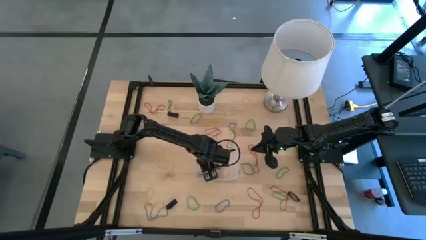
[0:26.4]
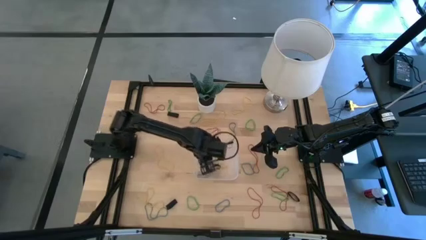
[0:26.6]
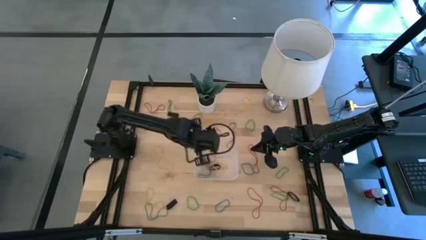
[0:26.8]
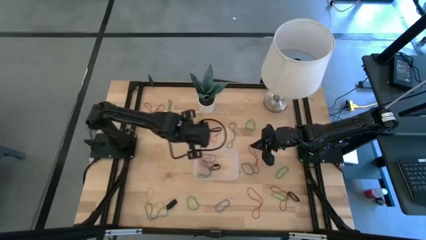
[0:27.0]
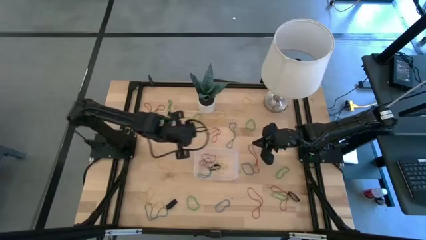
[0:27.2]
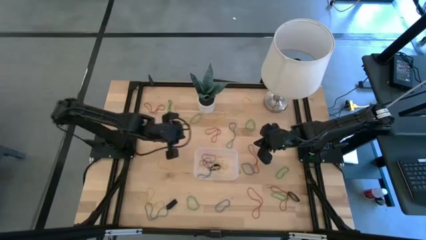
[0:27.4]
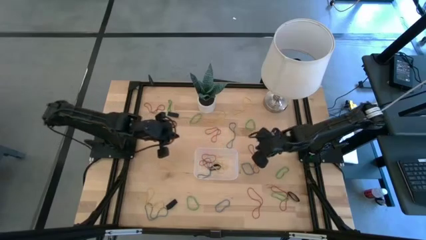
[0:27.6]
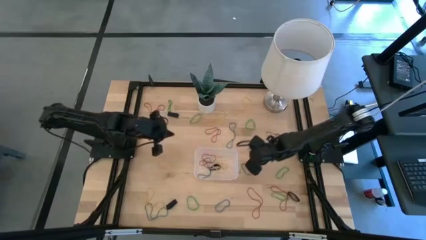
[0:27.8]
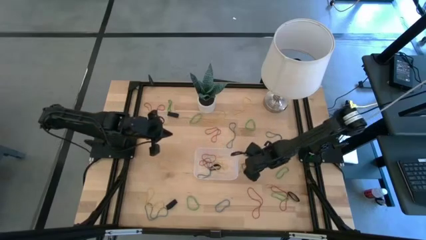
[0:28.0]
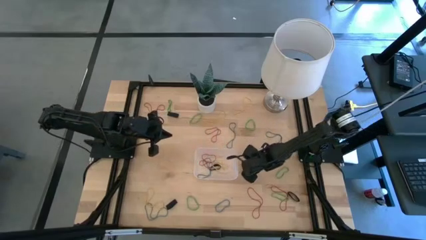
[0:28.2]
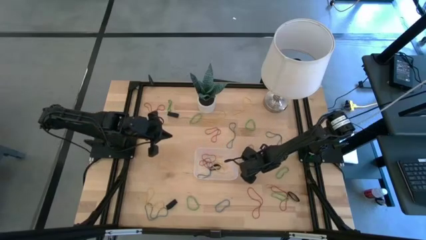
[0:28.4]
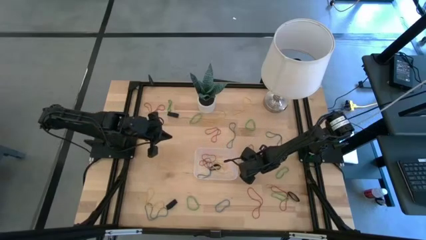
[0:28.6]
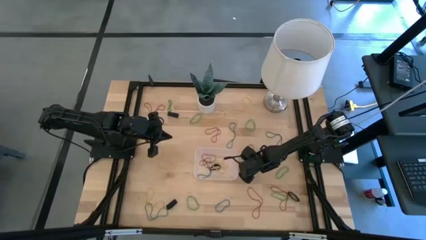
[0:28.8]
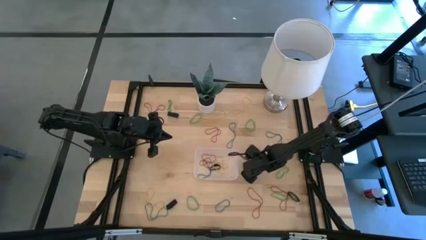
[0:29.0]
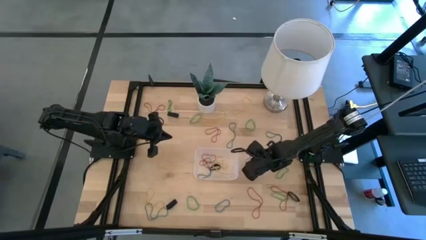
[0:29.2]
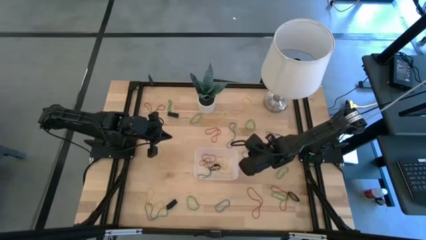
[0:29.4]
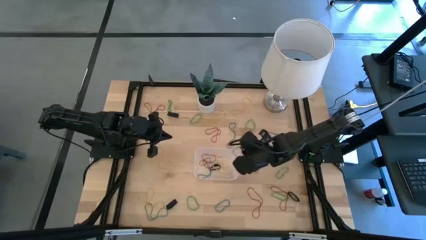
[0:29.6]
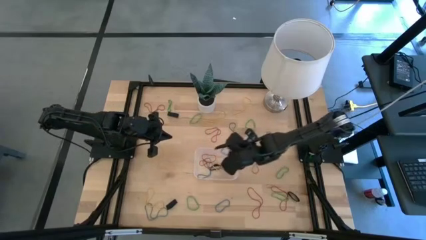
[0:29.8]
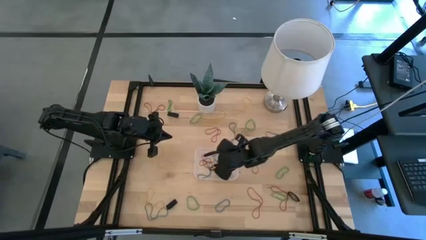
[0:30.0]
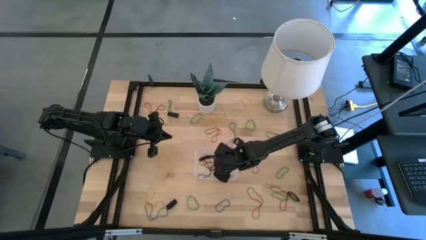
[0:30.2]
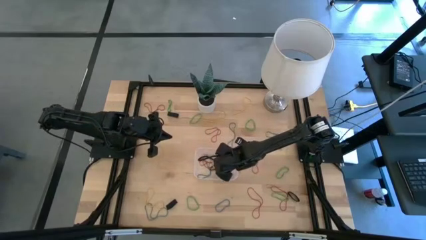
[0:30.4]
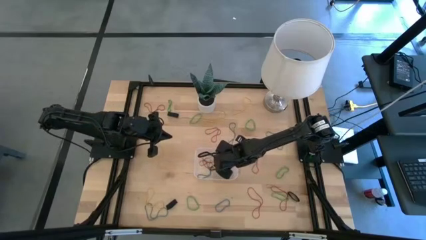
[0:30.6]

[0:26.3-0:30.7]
Task: Pick and place rubber bands into bin
Put the blue rubber band into the transparent bin

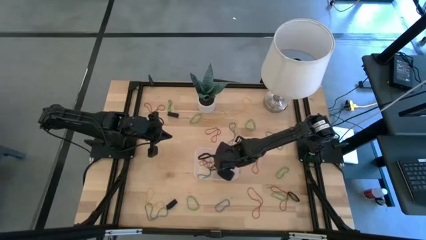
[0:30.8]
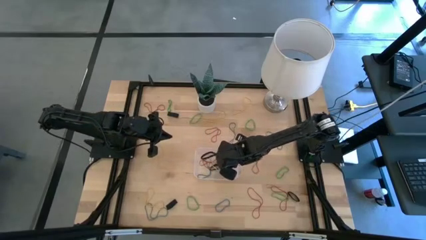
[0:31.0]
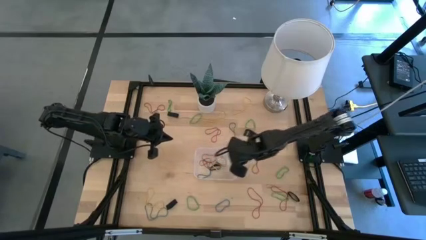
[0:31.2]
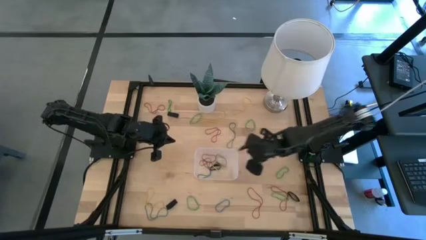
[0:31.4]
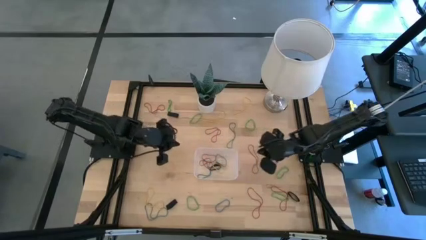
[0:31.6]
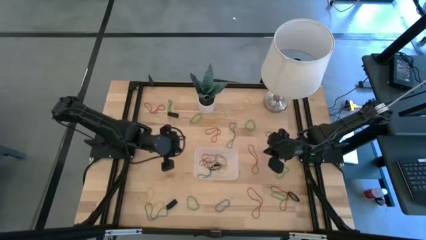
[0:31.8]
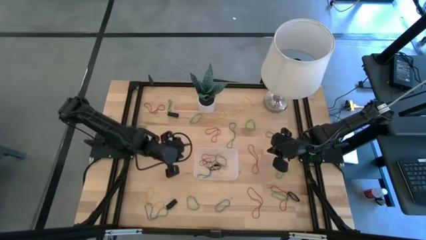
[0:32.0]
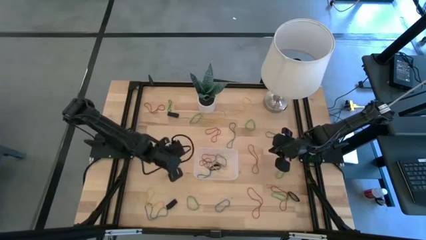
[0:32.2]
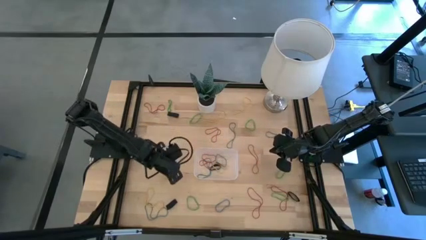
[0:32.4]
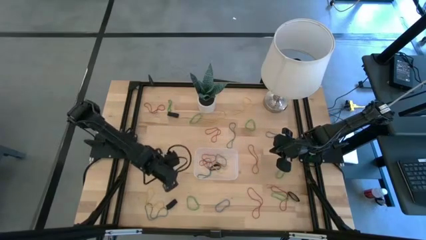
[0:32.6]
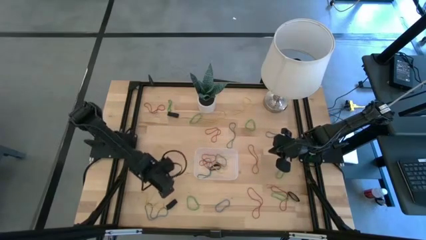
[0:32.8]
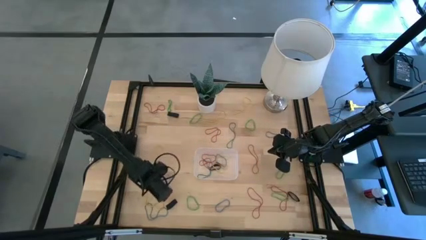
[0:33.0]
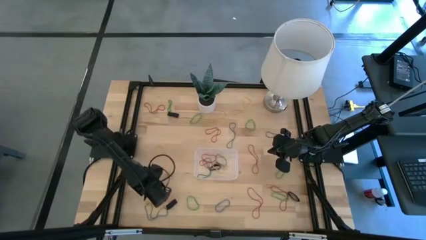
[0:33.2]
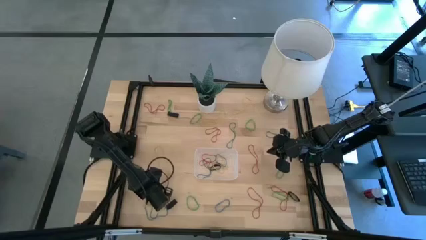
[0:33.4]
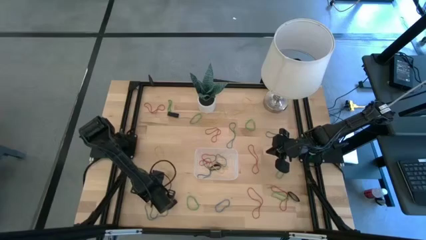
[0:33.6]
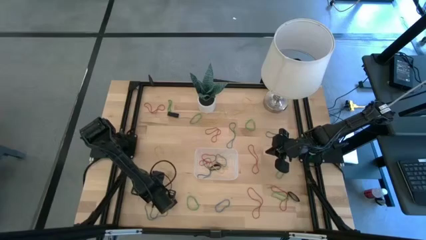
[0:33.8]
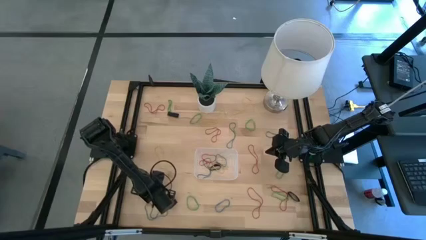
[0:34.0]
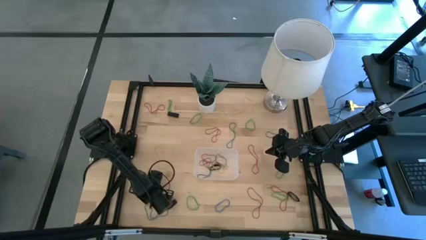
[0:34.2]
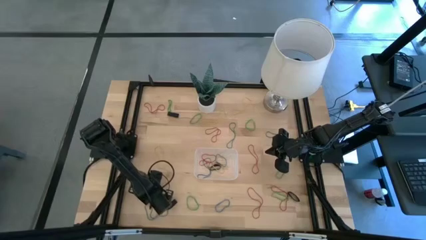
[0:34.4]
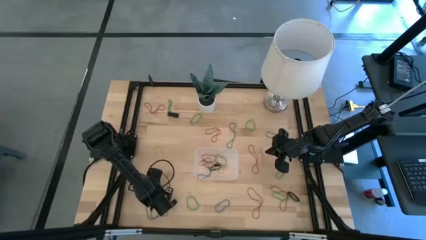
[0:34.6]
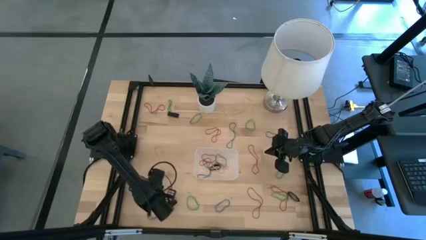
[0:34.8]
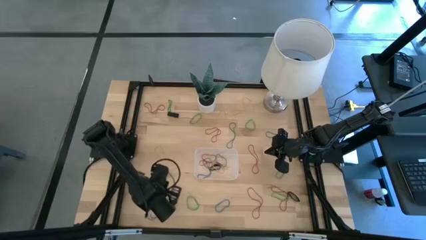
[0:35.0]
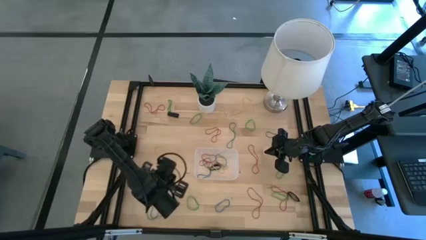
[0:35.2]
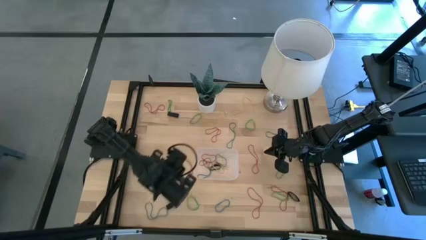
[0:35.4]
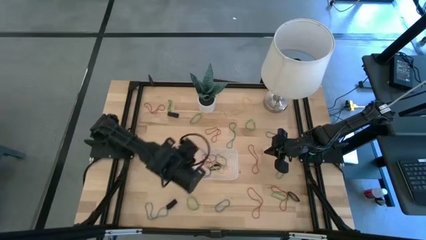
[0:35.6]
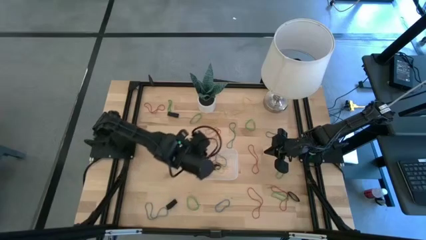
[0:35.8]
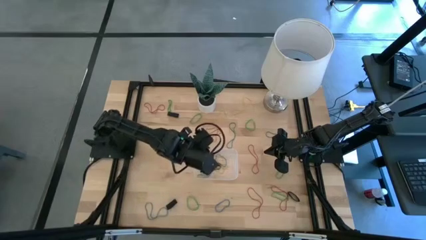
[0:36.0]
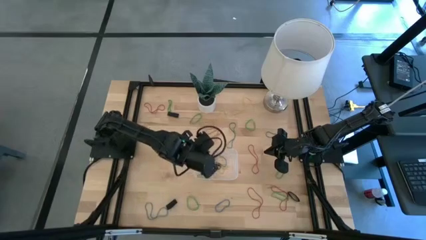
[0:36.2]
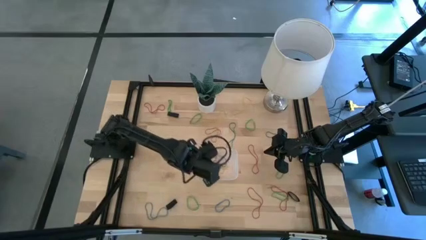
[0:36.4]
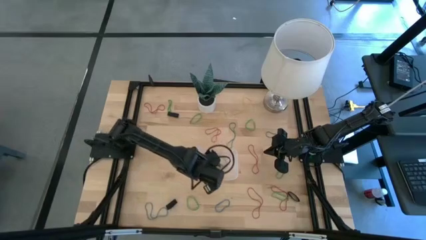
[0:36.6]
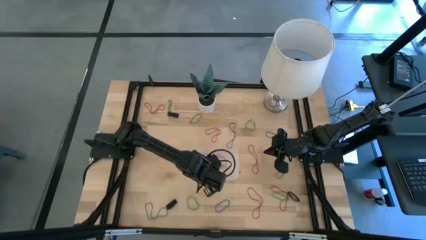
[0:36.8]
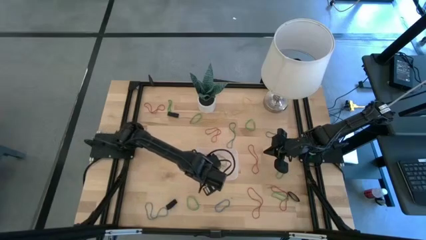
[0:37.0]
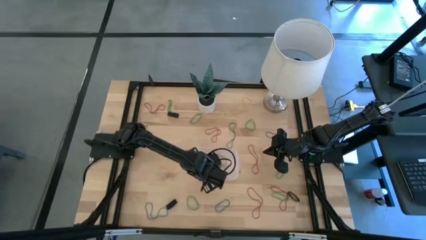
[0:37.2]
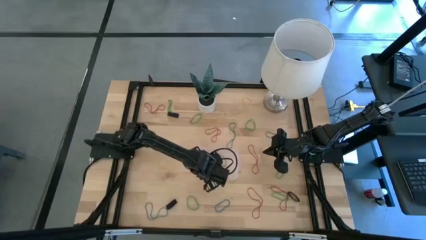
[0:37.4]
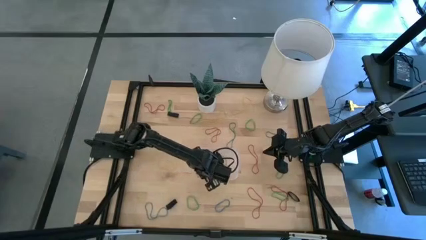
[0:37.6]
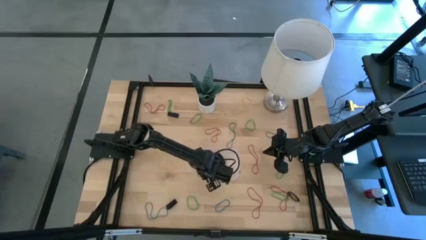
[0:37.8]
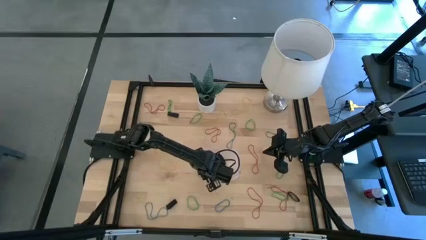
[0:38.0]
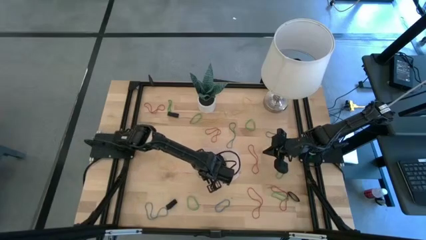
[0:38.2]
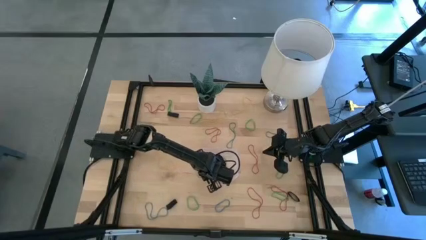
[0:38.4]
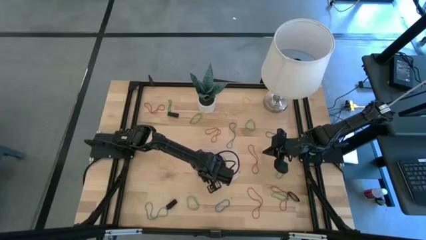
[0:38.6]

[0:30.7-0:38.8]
Put the yellow rubber band into the transparent bin

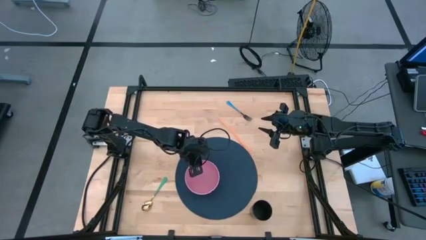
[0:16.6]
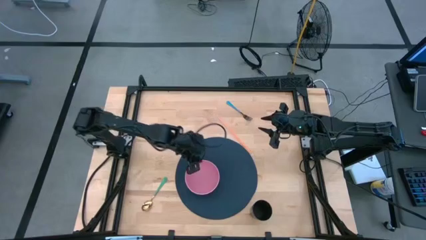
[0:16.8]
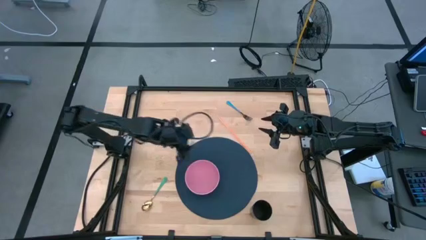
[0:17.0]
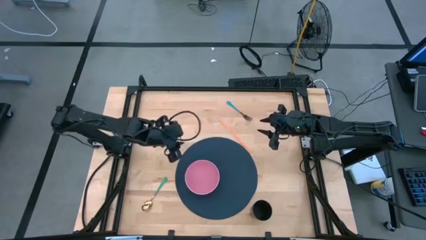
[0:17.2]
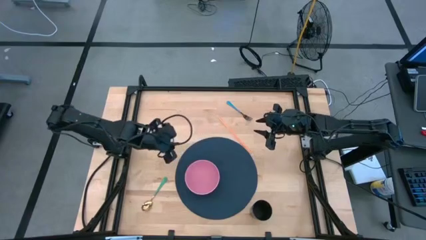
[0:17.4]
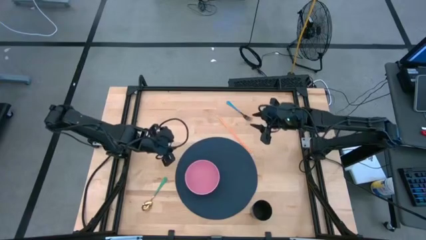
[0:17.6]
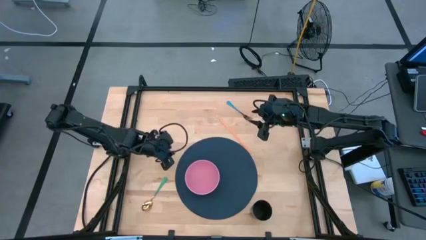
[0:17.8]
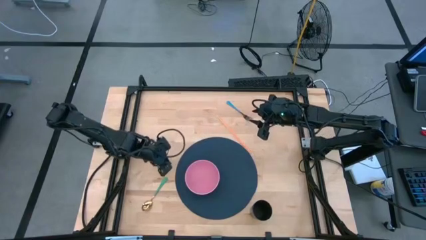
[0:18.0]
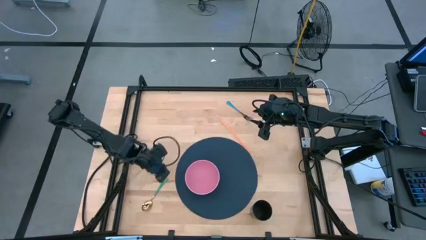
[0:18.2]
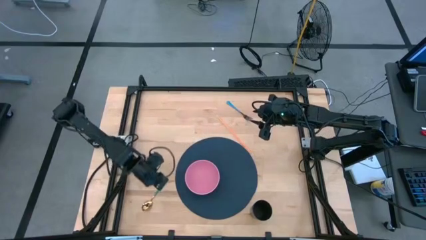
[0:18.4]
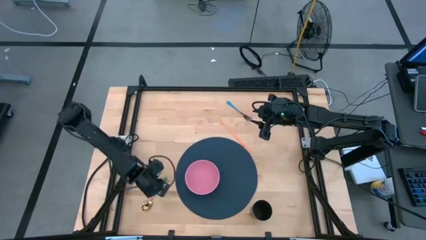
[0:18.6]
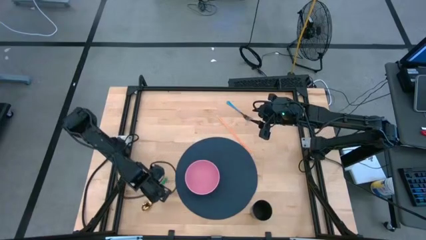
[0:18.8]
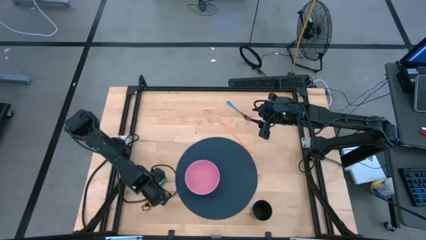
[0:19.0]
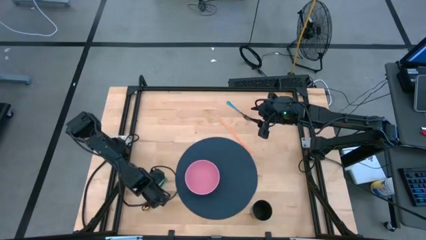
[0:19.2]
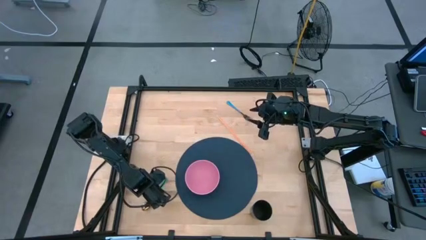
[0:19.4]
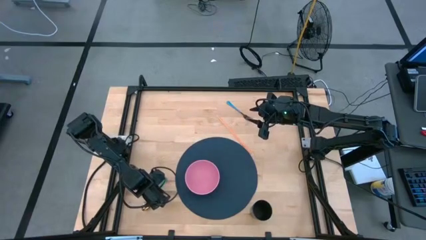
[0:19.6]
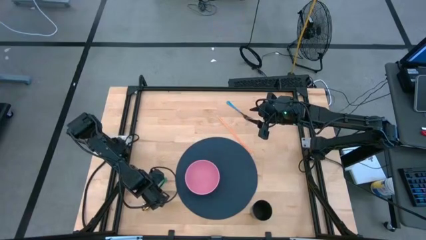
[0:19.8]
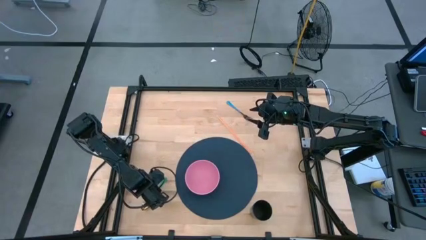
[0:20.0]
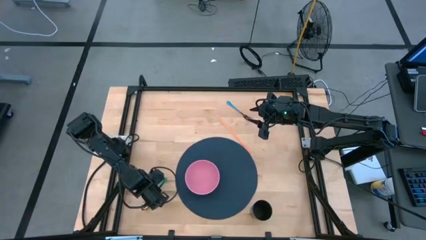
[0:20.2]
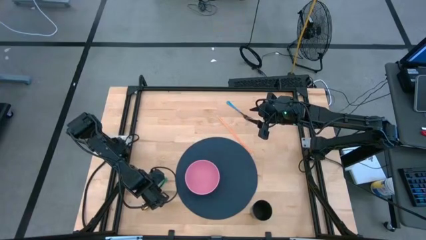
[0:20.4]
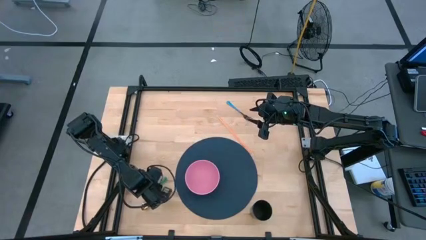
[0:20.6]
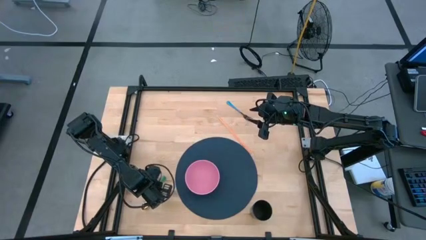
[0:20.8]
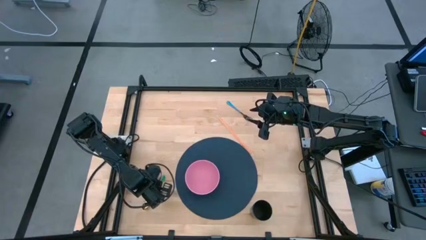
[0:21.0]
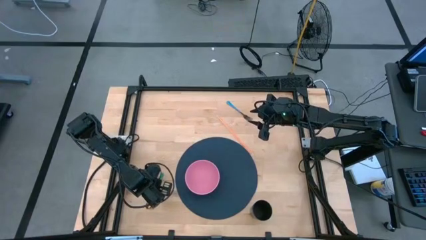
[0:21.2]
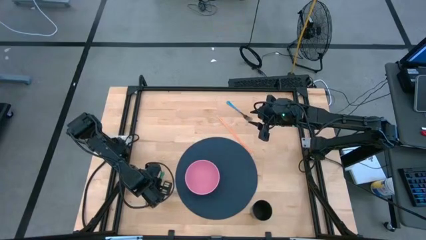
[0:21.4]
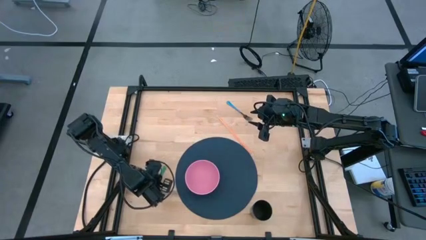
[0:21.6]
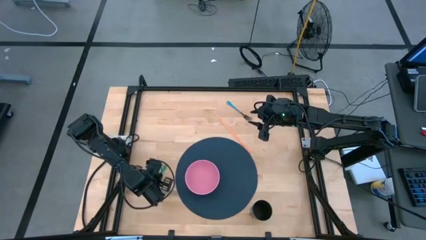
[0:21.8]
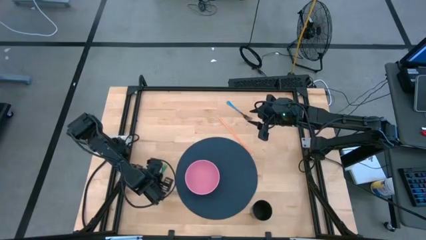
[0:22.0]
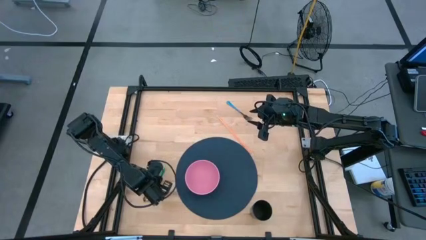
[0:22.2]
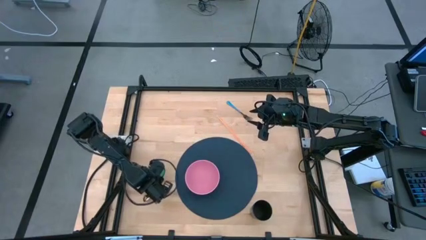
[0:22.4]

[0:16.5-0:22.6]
Task: Pick & Place Utensil
Put the green spoon into the pink bowl on the blue mat
